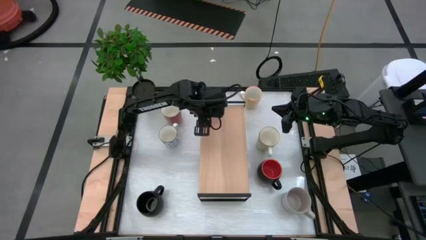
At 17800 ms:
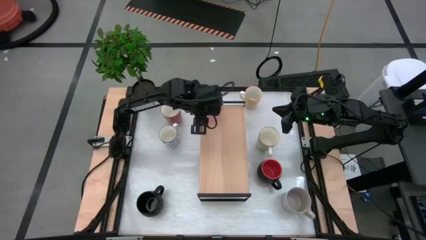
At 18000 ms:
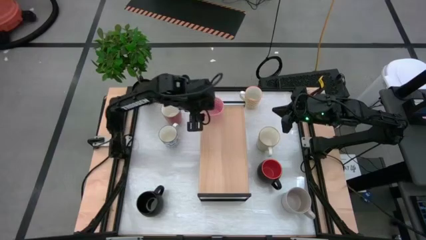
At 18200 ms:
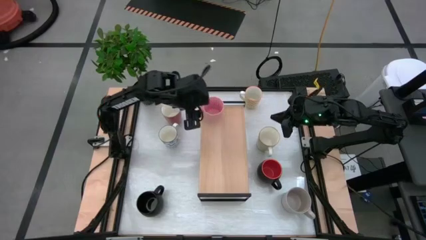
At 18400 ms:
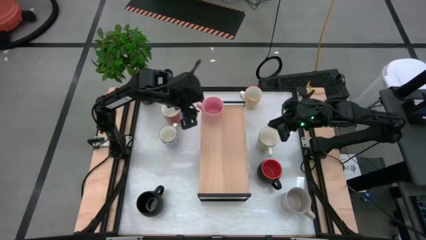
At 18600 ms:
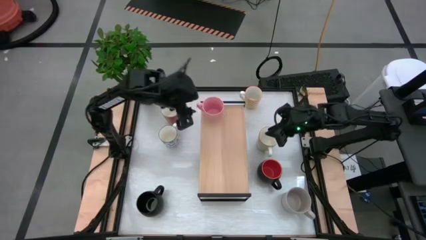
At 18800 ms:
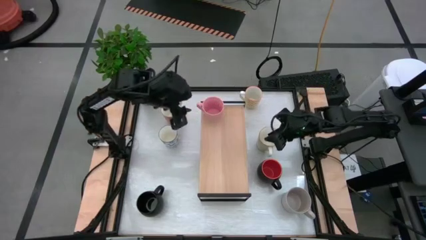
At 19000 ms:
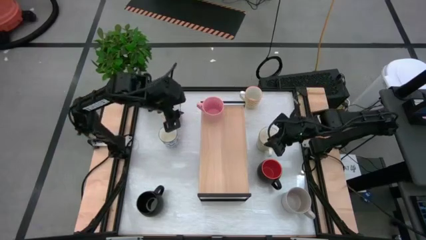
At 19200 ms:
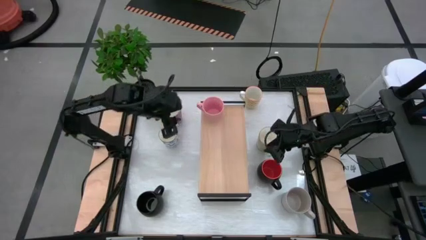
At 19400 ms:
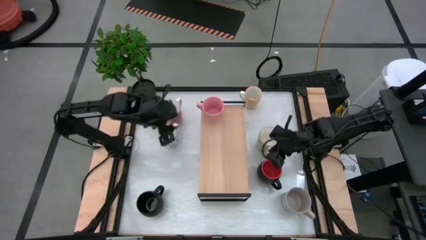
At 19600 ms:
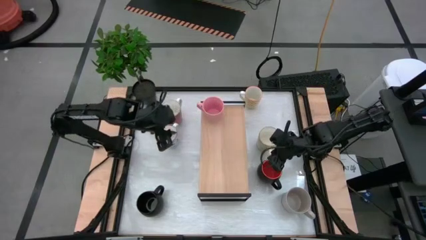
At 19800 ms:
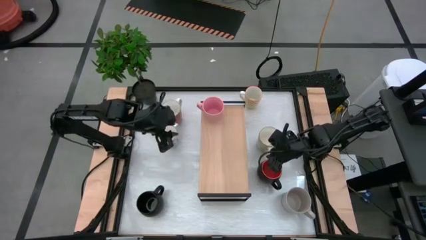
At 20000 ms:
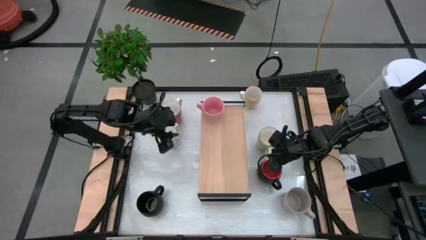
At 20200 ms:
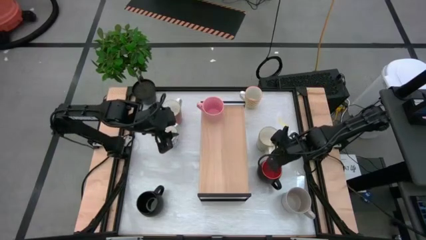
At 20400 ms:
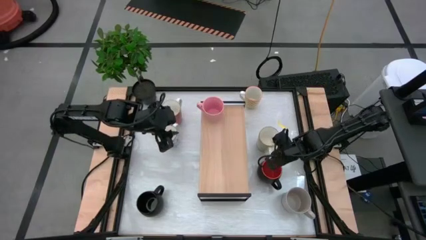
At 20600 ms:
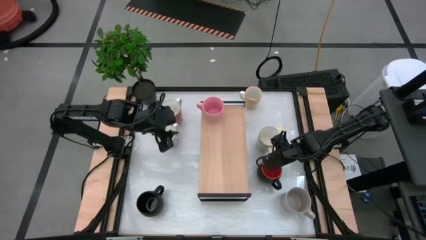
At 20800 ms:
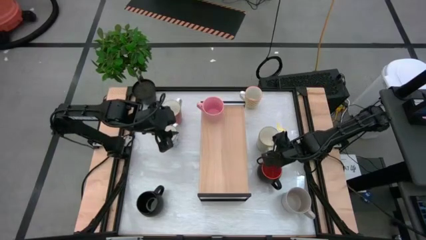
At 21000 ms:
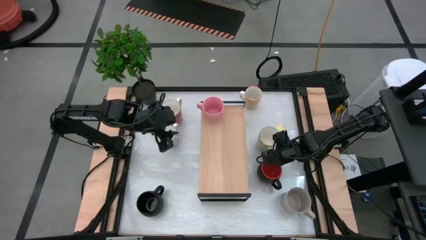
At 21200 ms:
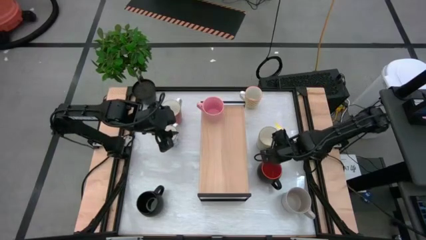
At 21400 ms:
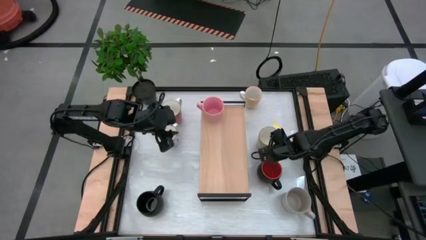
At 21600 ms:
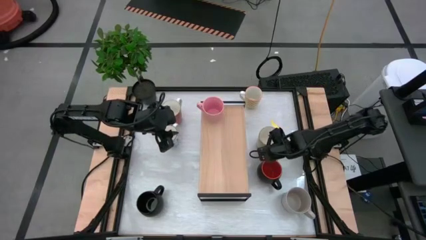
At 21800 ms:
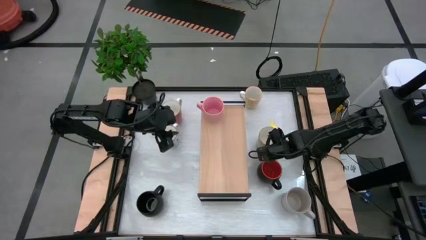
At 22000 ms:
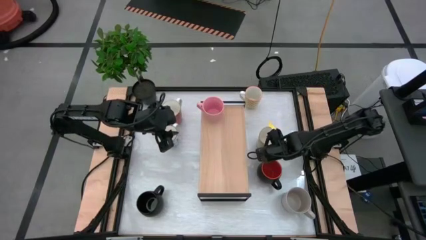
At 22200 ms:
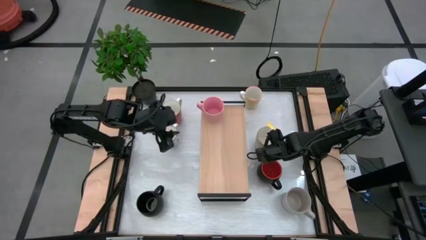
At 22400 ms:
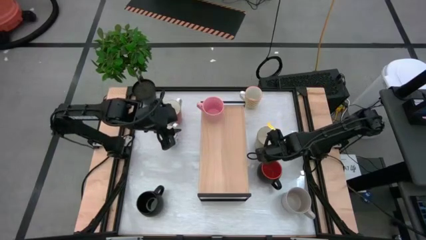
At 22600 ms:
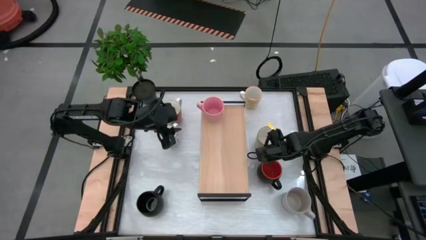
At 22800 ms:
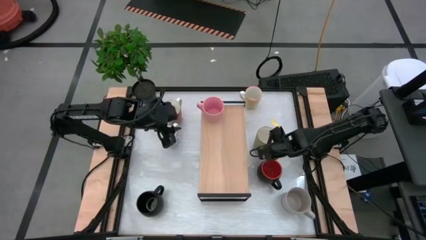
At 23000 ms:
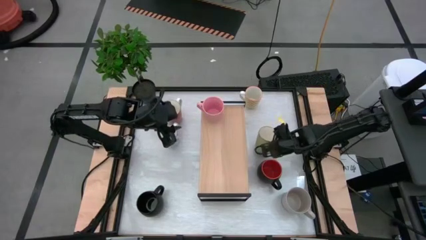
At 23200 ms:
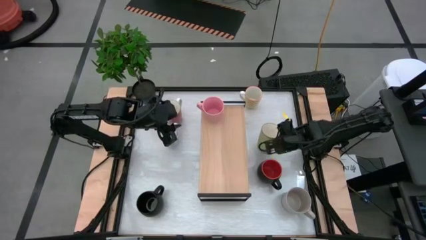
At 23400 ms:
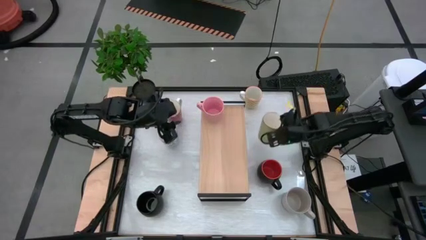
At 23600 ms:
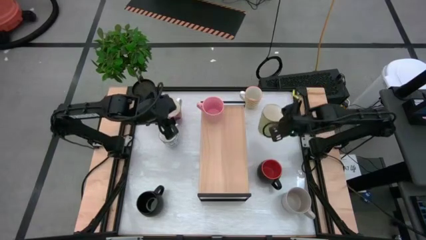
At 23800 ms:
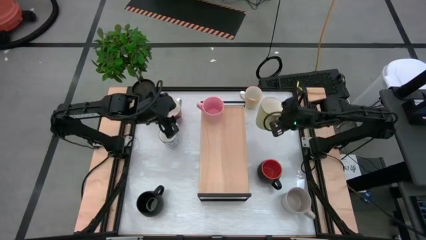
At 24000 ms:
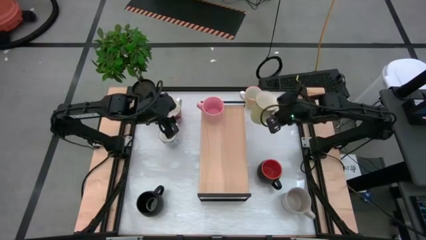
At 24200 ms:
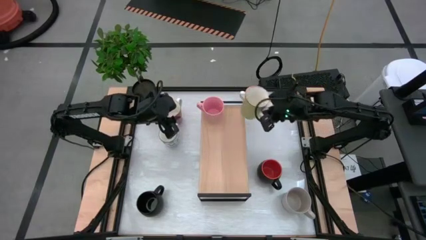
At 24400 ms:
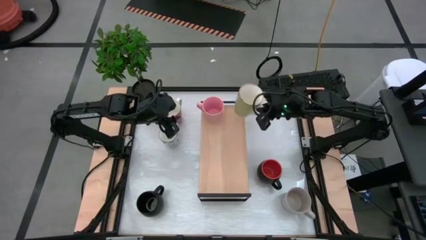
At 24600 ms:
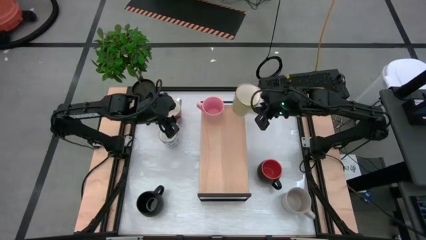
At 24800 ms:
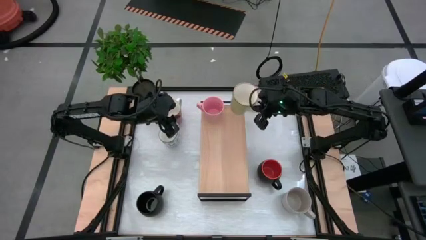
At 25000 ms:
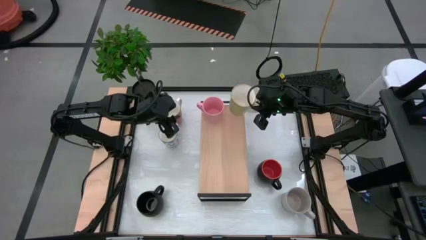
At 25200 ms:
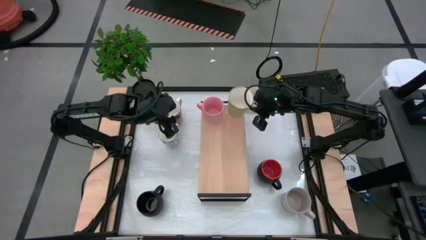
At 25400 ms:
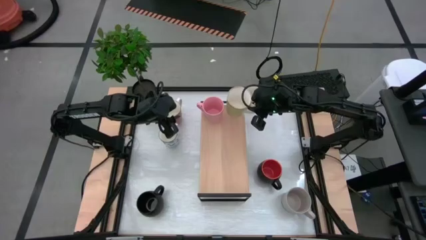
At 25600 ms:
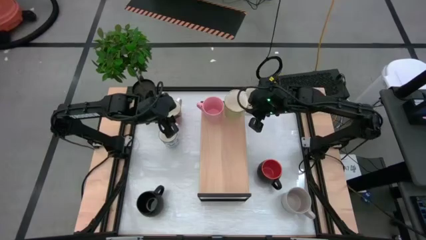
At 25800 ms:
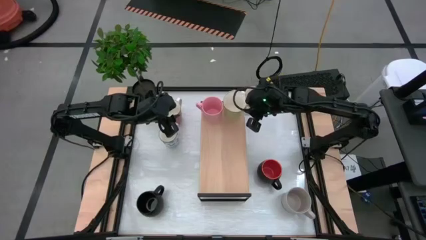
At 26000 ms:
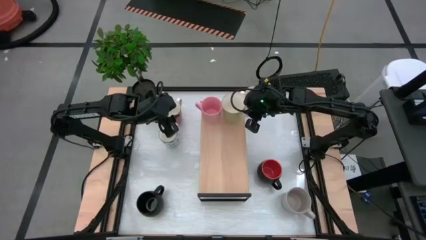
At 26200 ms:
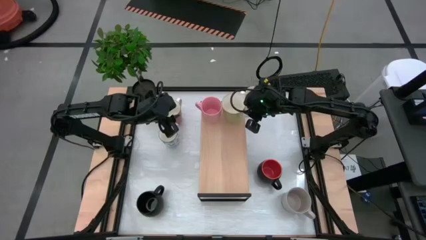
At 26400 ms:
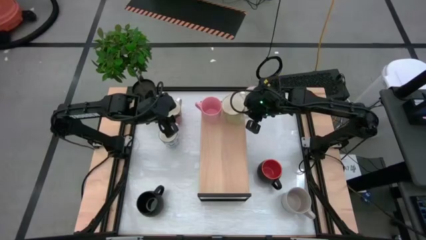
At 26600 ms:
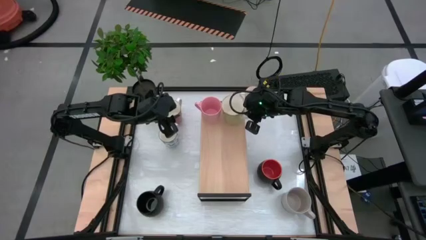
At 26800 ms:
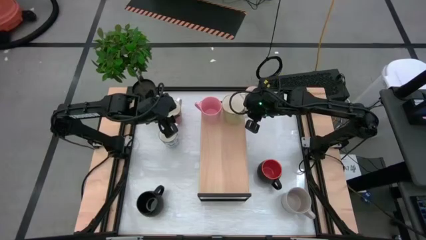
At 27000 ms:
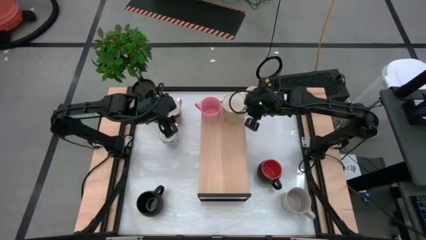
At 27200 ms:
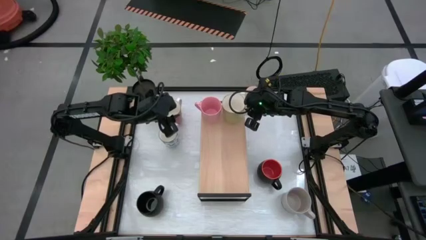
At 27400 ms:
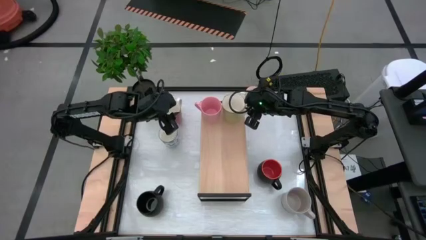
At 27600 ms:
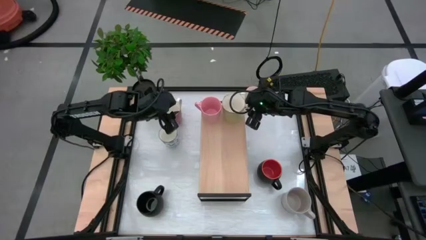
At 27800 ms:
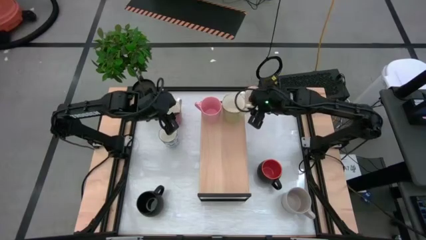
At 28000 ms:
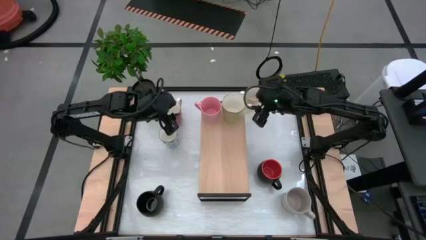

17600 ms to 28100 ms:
Task: Place coffee mugs
Put the green mug on the shelf
